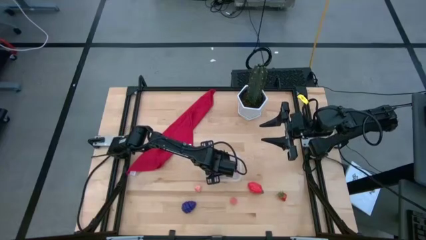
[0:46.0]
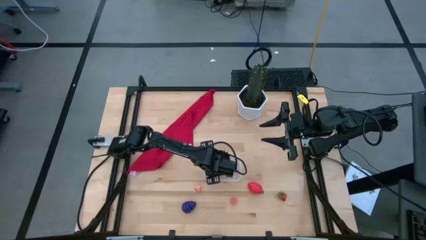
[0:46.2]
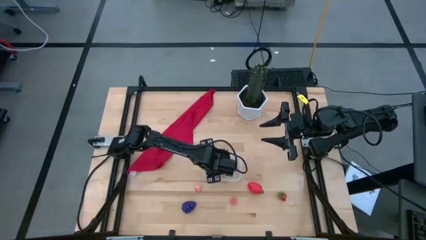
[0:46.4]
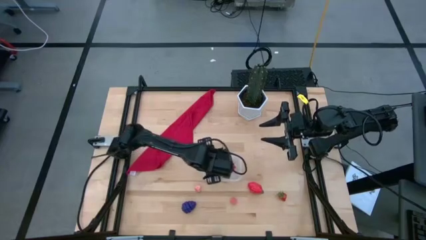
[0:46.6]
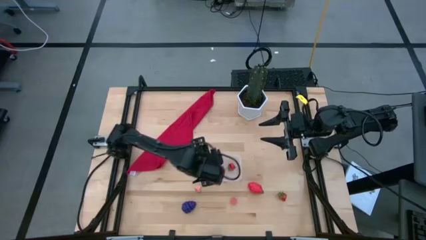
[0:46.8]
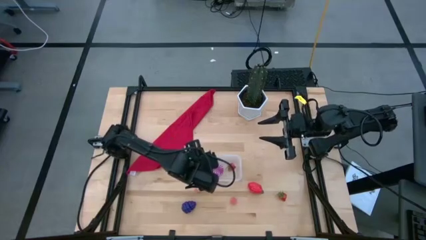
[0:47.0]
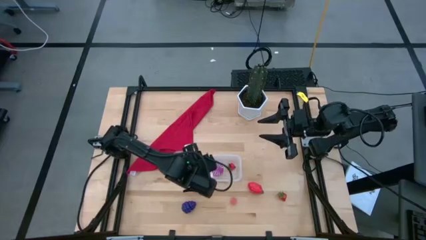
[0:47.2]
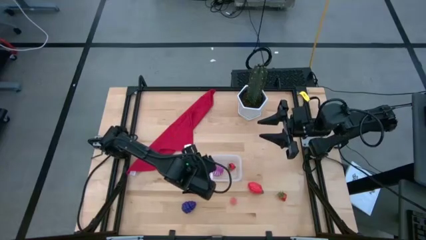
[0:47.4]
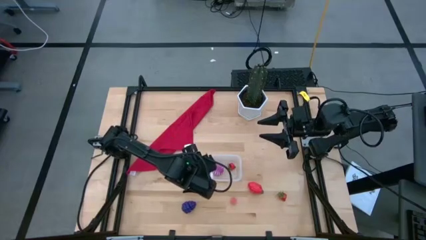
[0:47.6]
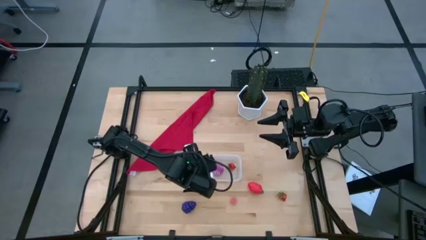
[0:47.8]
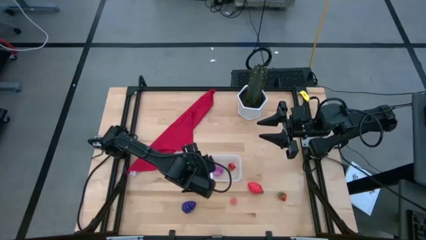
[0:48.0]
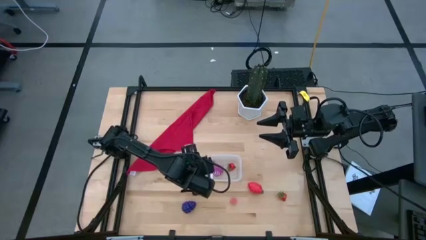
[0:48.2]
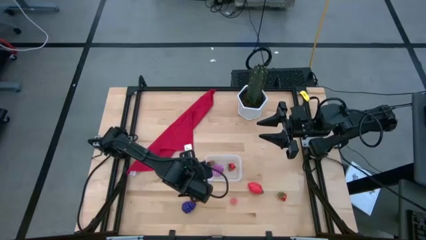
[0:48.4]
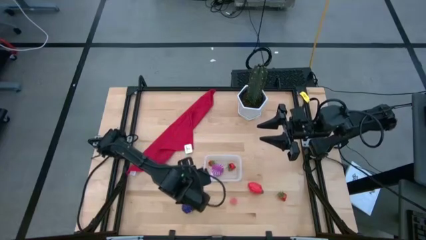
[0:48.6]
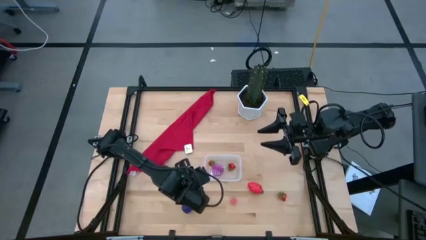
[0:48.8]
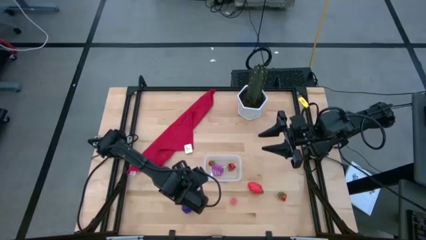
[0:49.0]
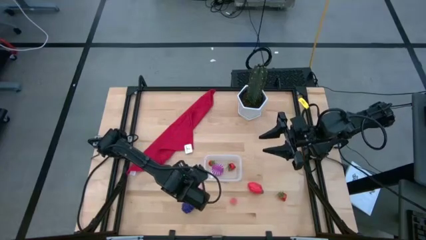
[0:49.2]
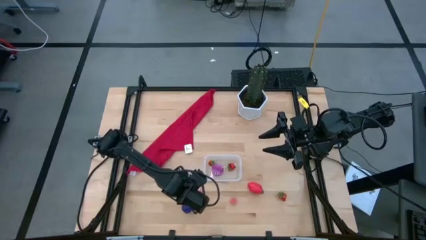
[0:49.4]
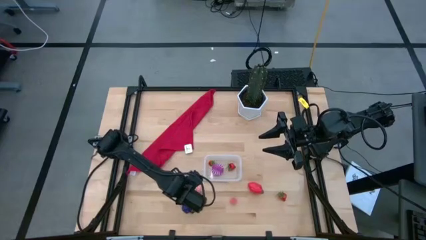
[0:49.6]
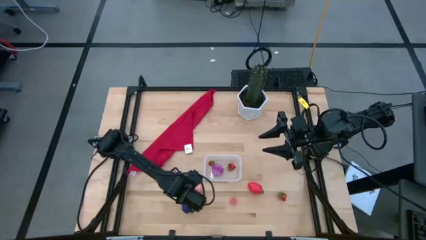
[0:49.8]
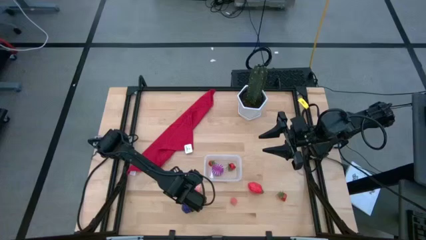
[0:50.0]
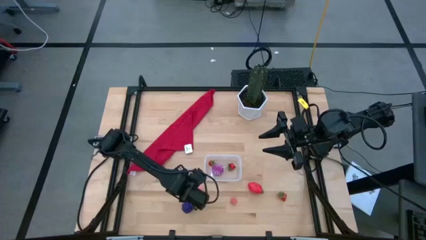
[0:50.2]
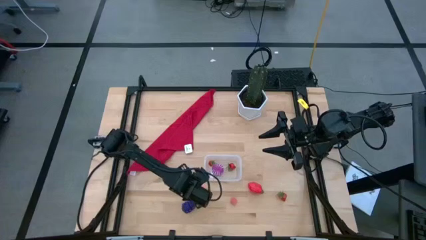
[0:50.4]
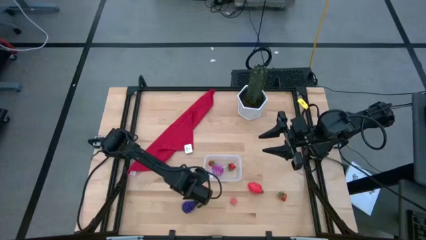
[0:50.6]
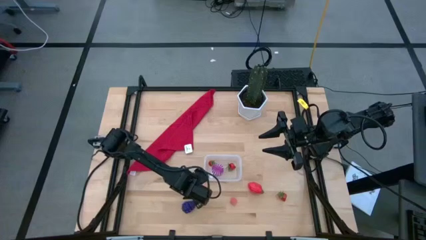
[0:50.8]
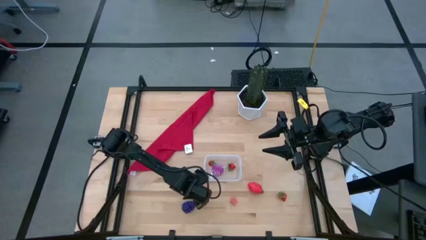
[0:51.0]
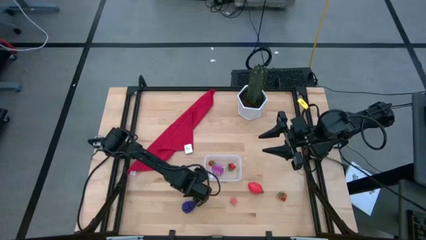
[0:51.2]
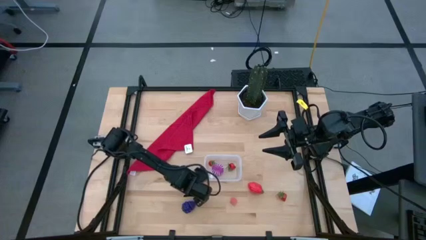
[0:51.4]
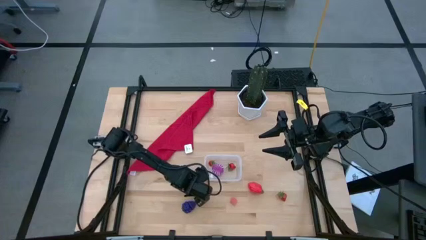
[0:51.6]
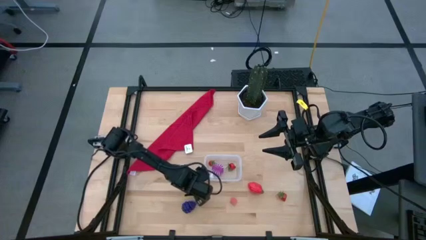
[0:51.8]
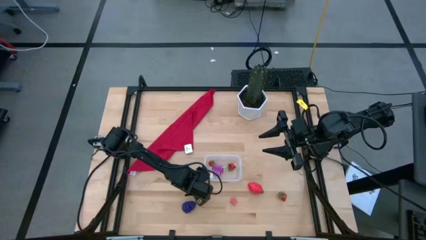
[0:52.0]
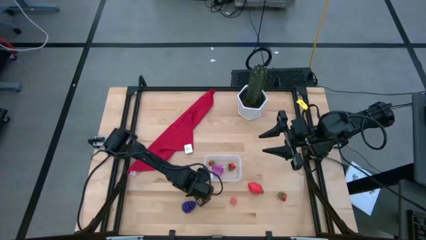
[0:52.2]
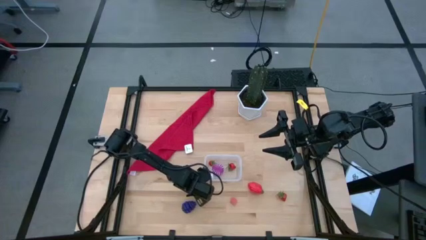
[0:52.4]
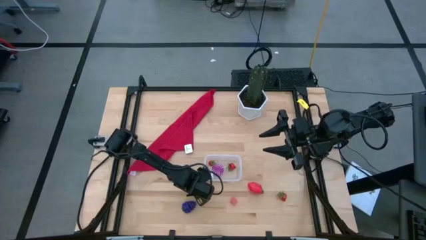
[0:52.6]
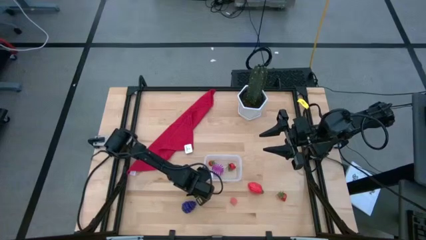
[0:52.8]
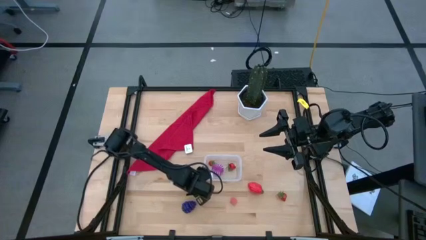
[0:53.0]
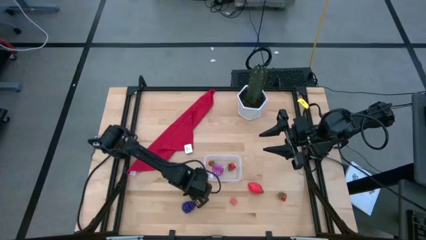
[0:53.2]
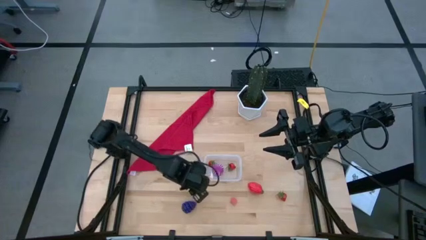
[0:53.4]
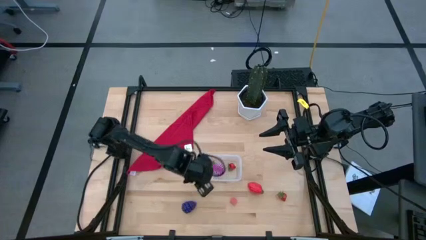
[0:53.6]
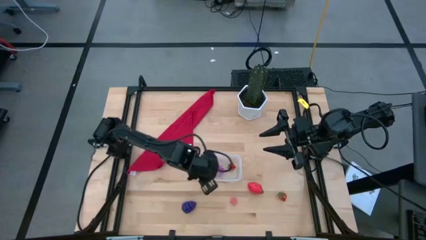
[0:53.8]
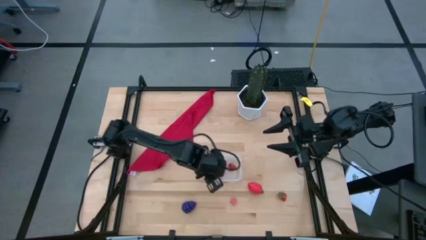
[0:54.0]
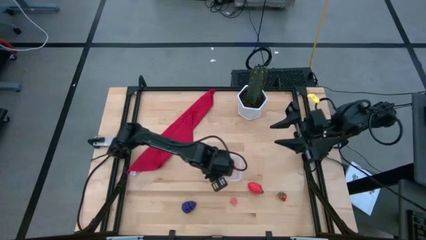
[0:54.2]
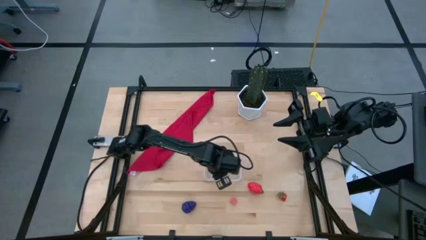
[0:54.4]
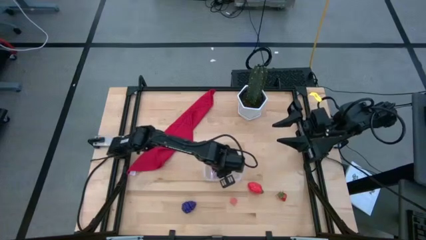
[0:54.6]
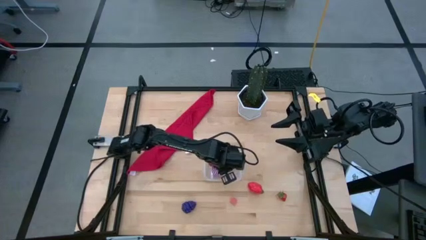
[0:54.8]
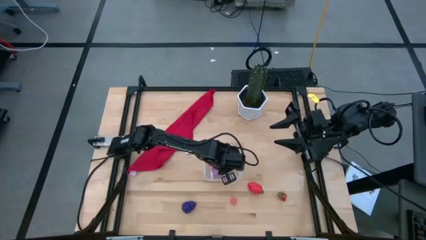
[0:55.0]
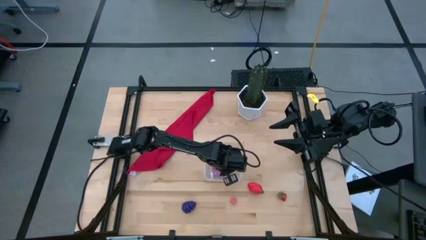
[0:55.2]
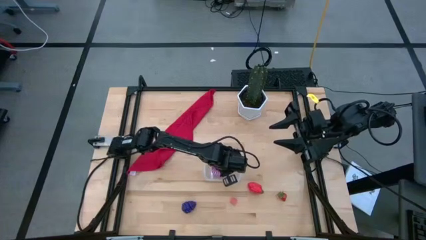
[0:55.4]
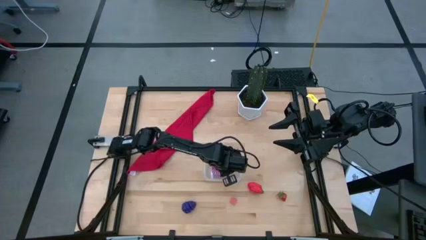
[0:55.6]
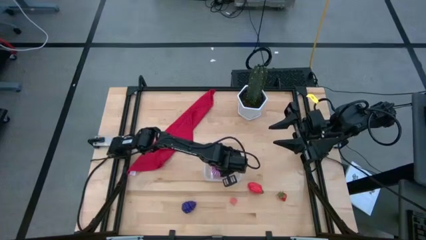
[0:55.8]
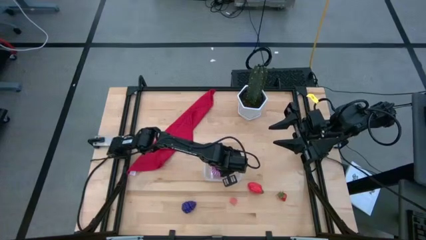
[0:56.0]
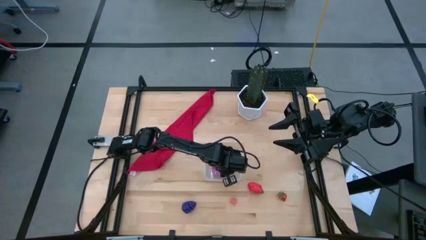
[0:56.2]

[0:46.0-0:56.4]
Task: Pick and placing Produce into tupperware
Put the left pink peach into the transparent bin
